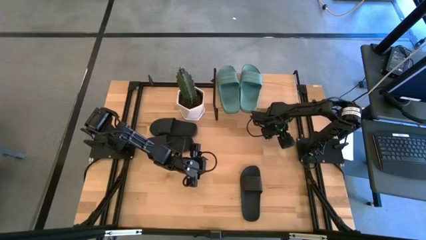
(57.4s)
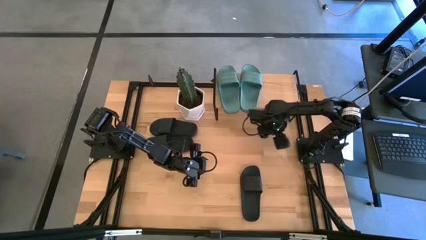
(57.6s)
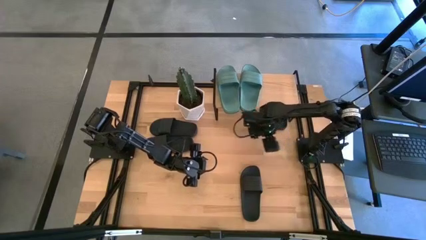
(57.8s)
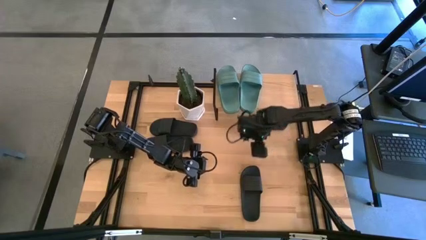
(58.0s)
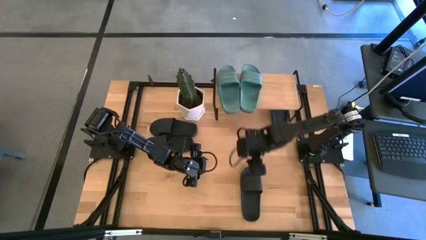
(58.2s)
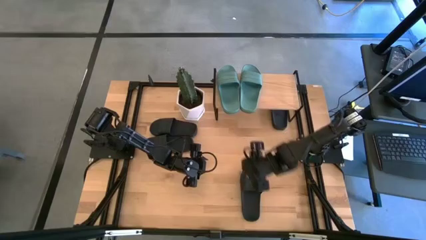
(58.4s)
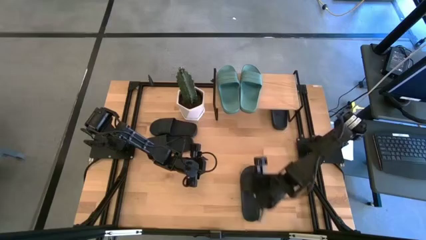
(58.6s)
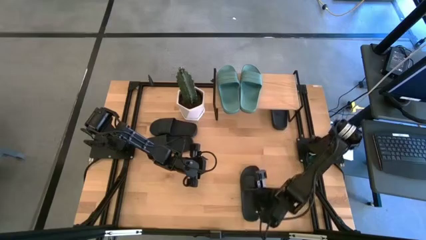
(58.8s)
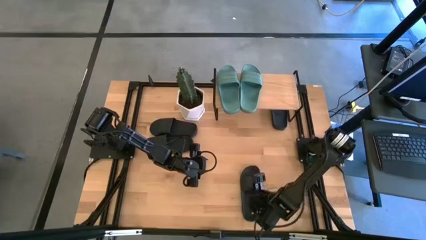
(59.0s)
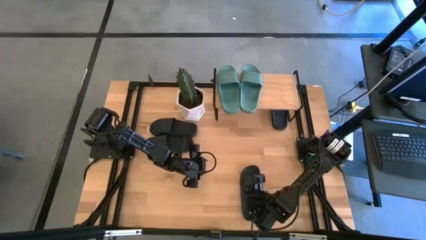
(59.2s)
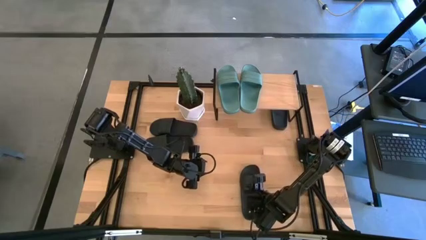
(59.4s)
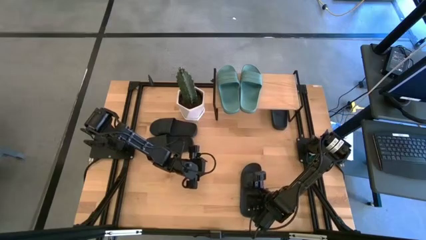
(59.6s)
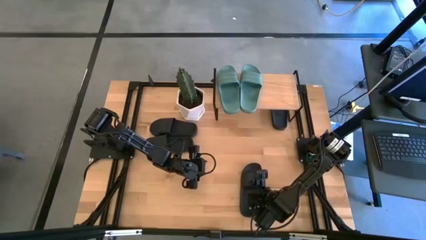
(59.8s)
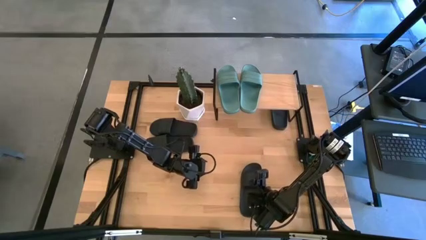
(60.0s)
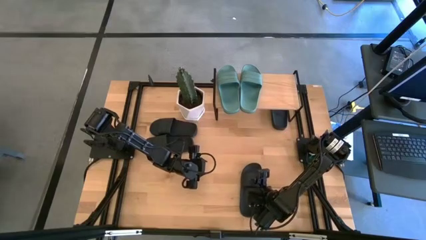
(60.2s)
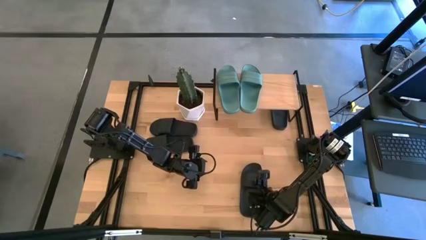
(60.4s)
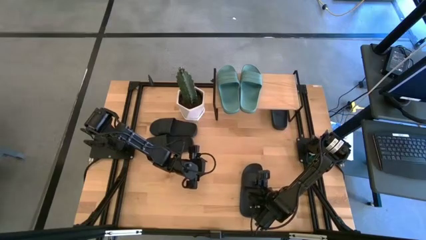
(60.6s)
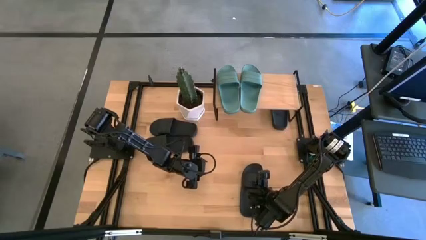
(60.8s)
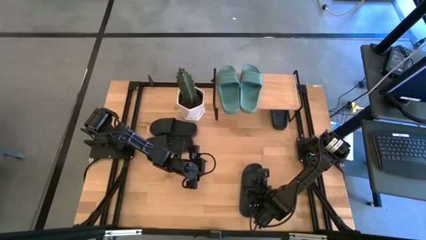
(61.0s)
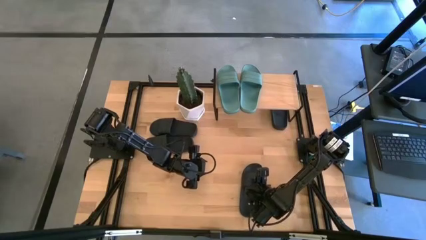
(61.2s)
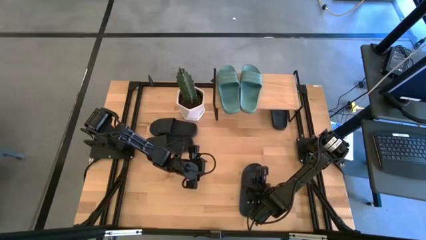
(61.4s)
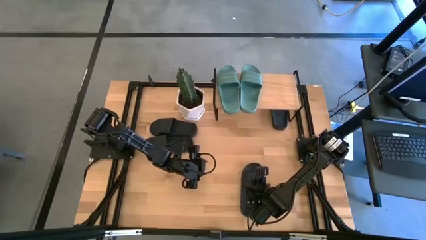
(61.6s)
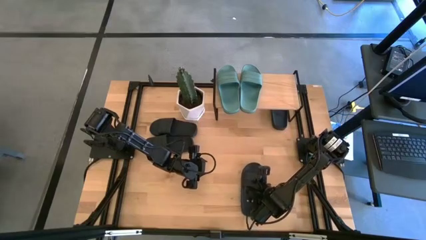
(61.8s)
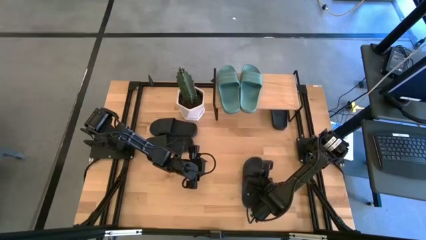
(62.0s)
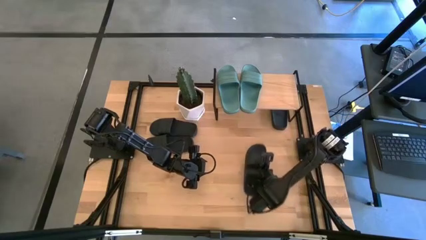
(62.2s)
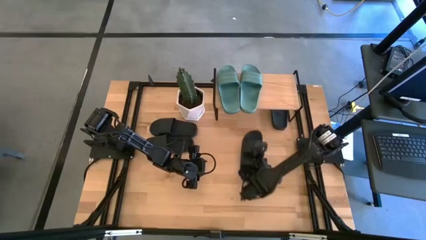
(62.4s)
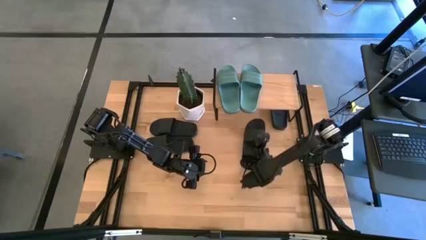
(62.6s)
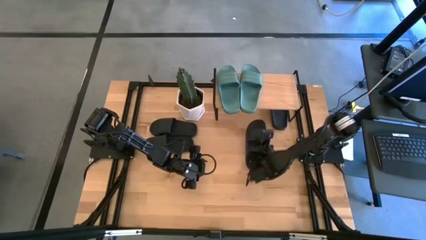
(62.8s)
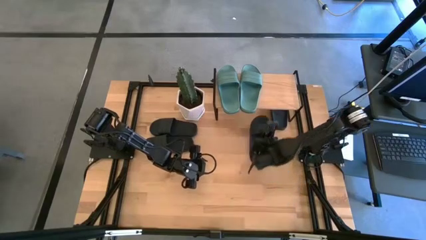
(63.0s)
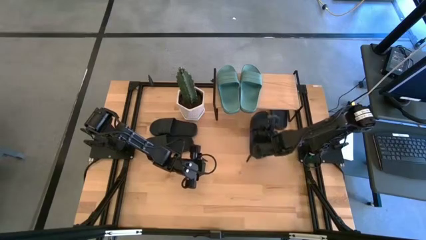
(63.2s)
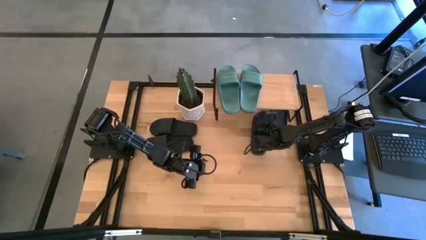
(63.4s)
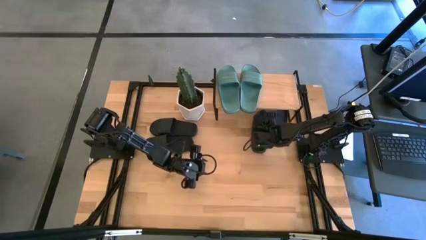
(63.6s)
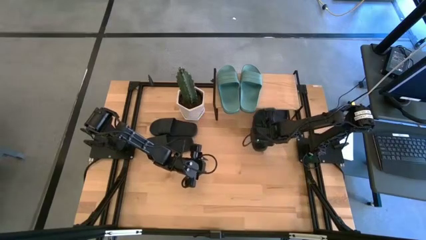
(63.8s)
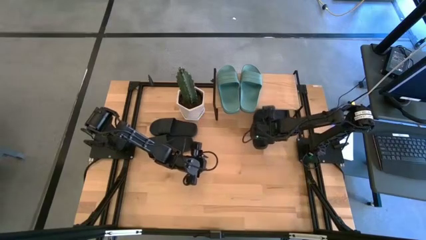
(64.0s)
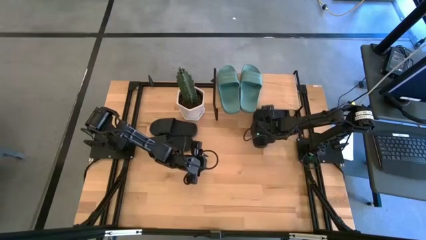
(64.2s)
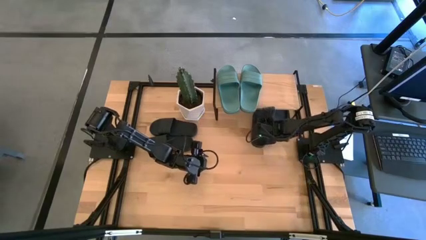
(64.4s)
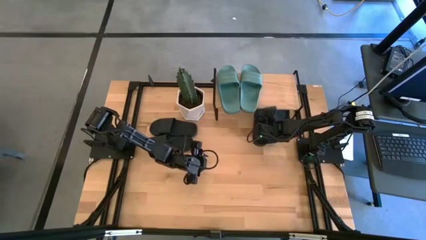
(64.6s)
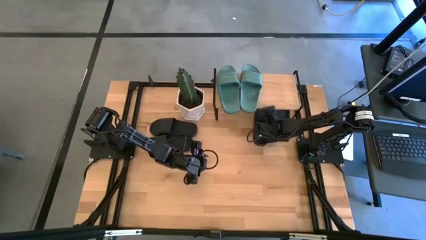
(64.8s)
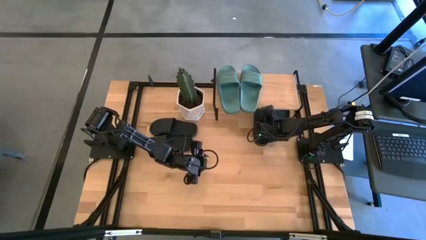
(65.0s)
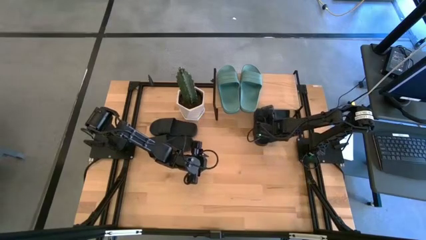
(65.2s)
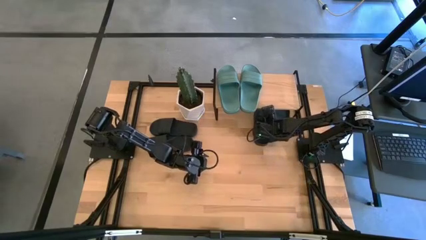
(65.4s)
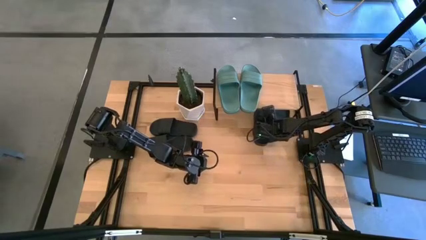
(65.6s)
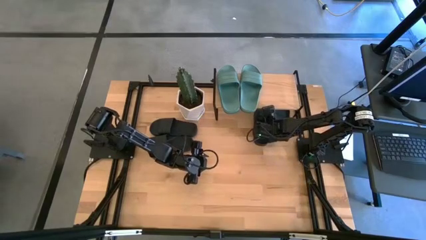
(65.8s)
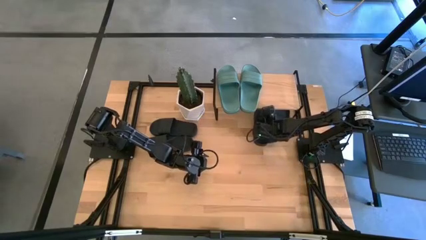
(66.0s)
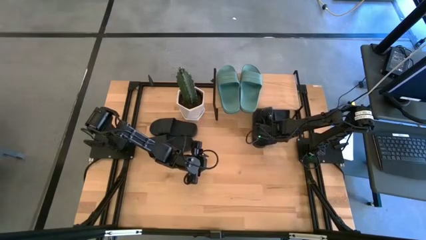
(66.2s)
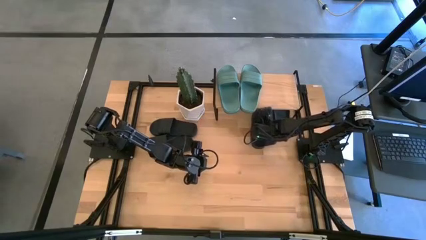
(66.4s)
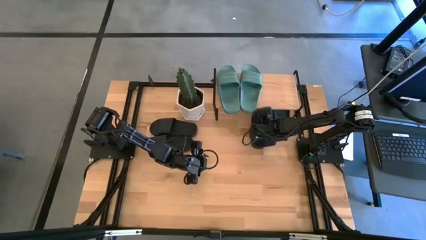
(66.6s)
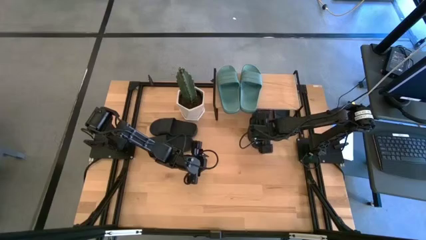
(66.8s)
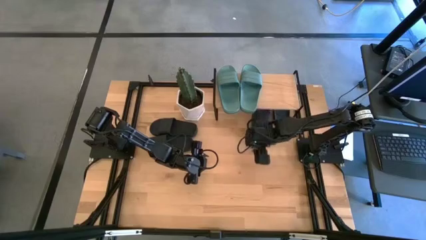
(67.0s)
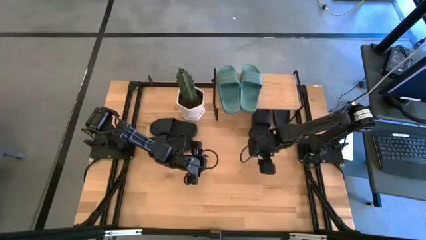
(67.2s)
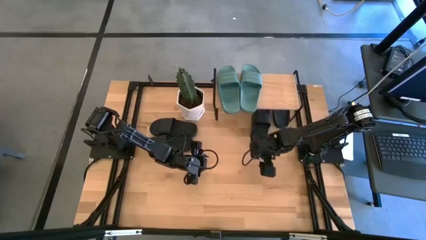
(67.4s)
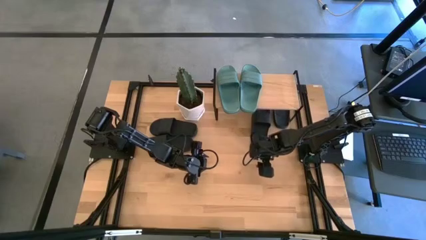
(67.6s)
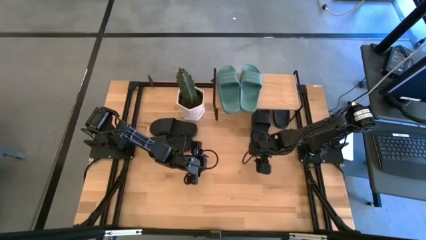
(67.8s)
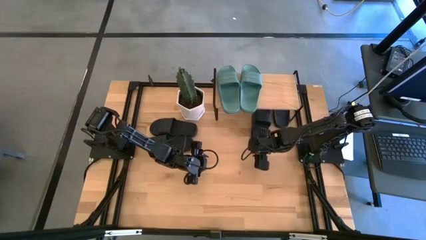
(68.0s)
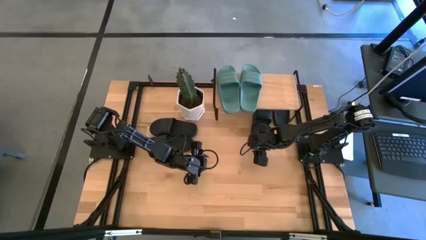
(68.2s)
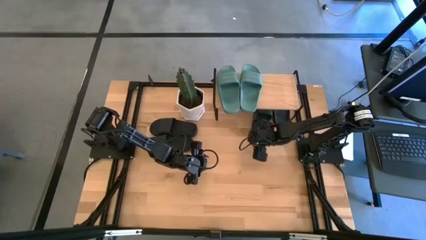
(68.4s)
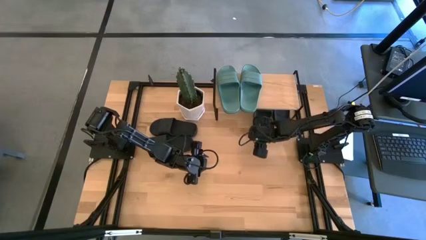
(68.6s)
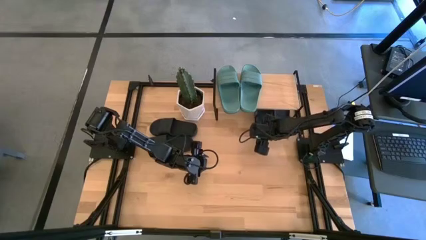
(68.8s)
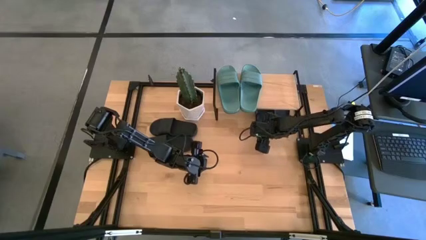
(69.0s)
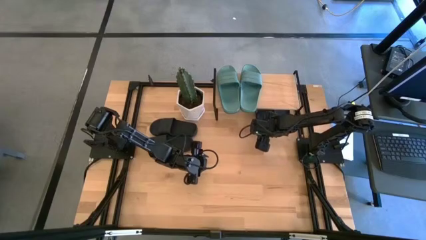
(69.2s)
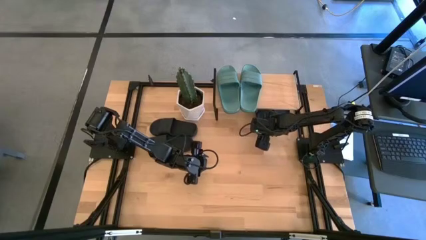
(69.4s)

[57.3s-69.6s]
Task: Pick and place slides into the shelf
Put the black slipper under the shelf

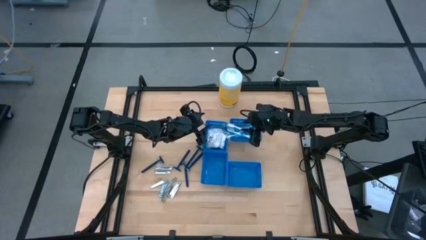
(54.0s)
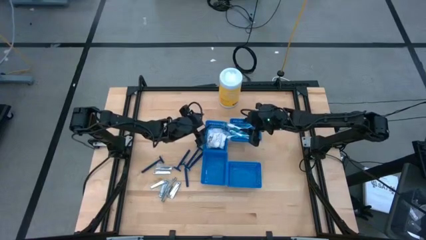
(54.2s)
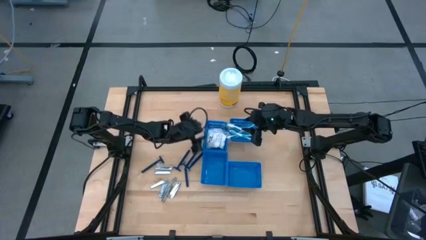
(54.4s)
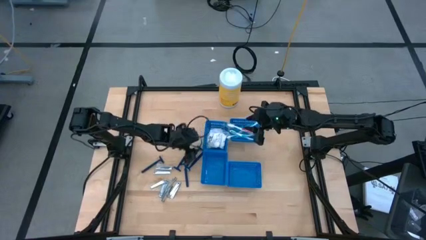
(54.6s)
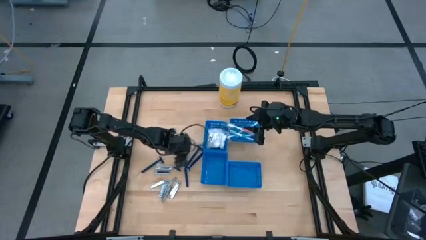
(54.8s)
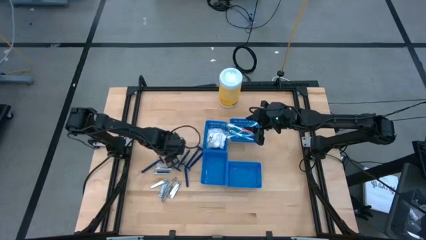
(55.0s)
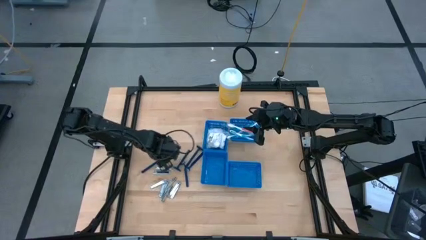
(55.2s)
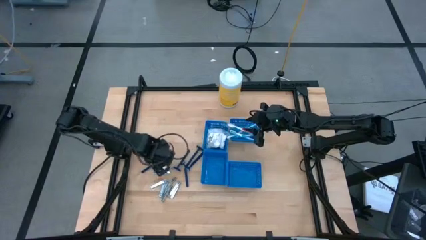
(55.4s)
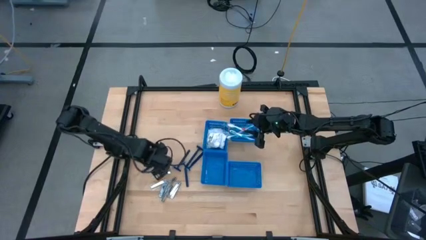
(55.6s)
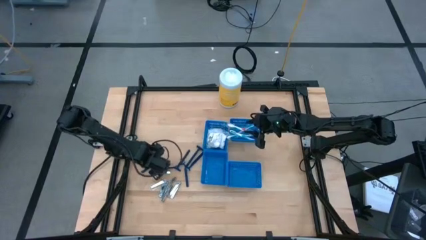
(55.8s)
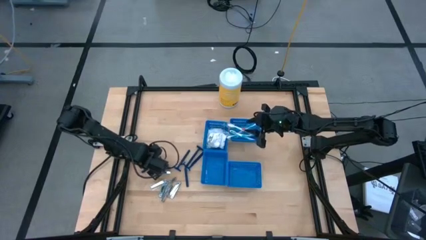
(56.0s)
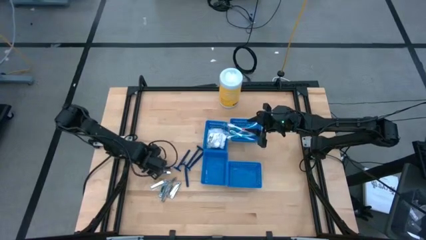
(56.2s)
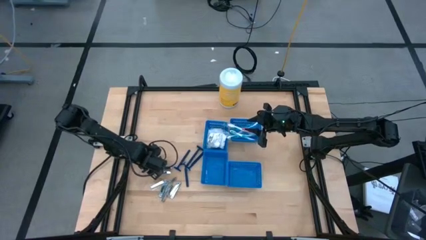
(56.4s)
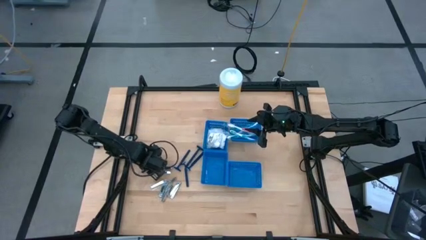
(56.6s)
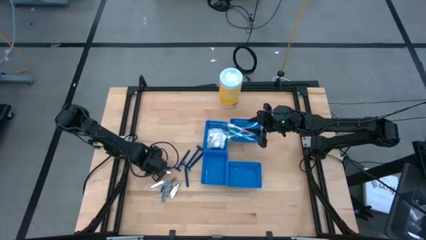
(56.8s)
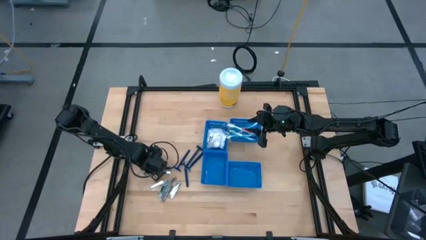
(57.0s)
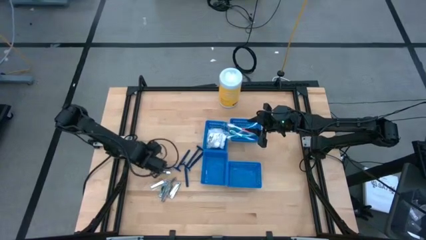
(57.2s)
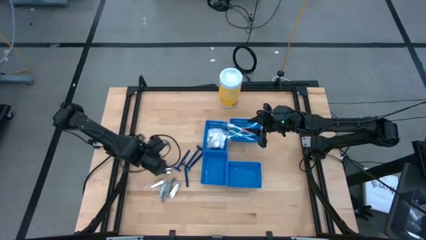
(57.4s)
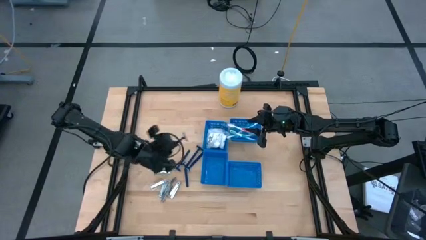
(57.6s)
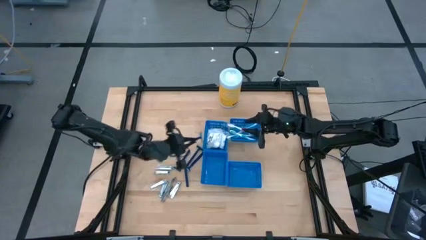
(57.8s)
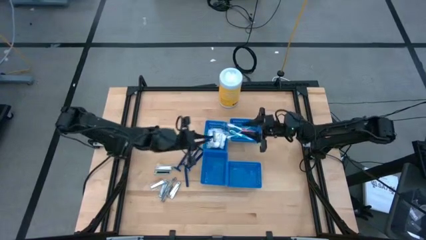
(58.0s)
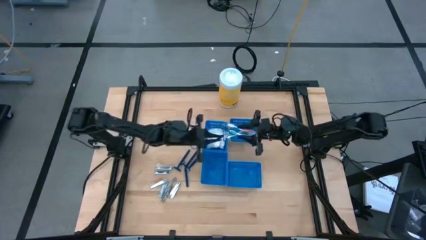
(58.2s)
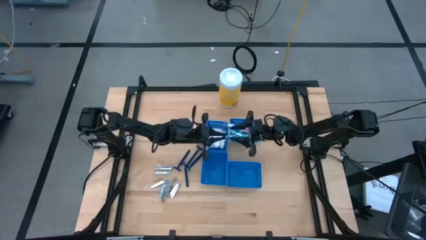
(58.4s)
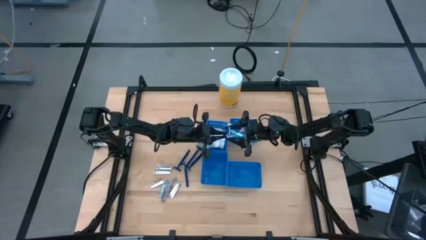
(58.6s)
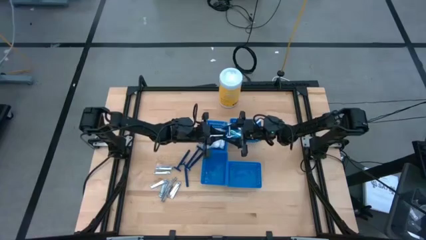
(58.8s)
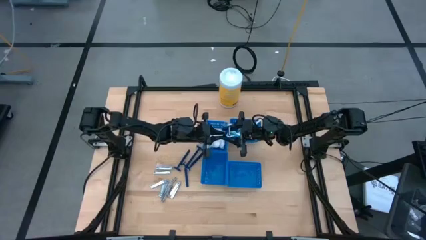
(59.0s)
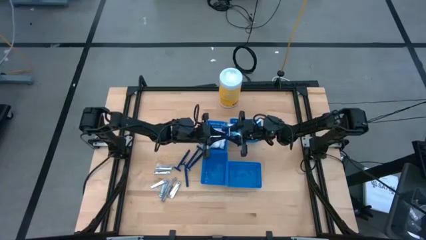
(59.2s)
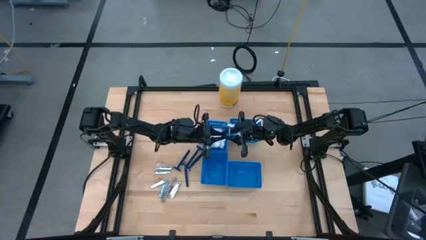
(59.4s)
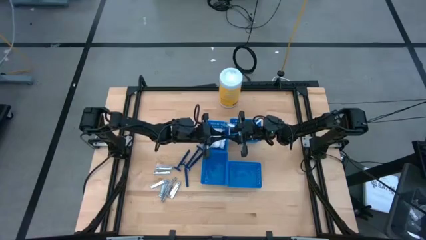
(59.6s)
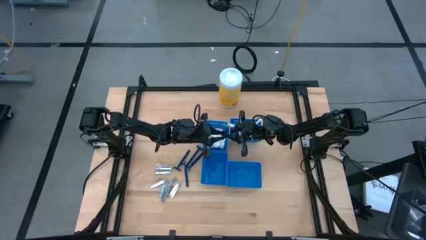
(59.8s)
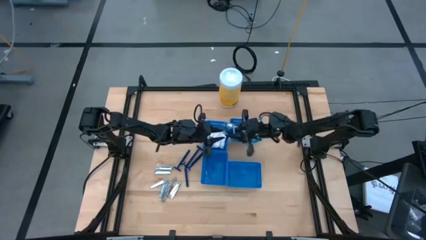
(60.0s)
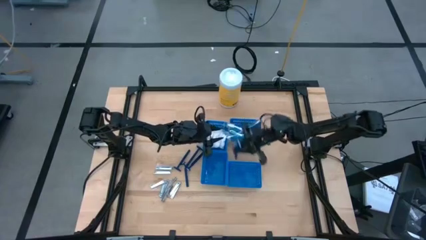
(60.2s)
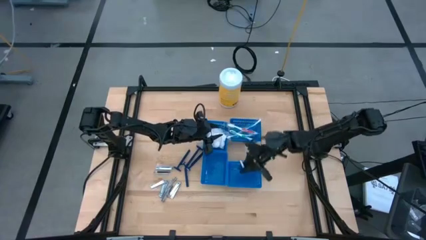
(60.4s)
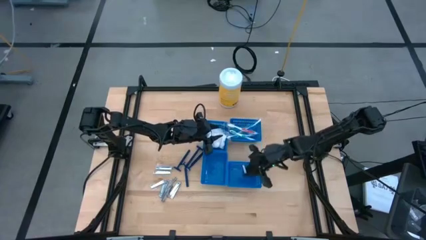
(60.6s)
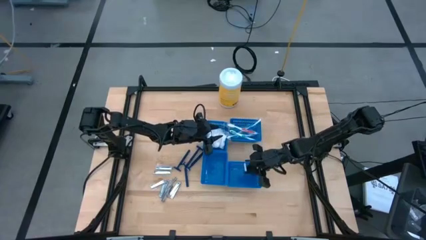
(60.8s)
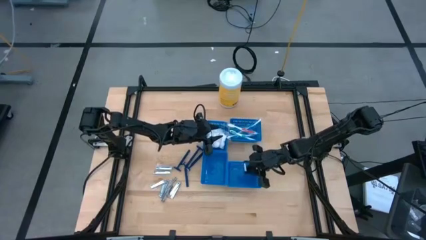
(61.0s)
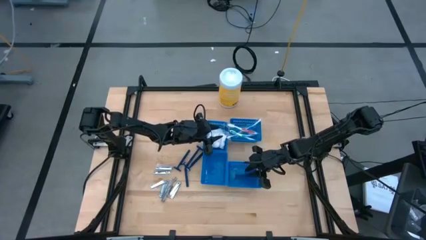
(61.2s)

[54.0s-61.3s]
Task: Pick & Place Travel size toiletries
Put the blue razor into the bottom right blue bin
